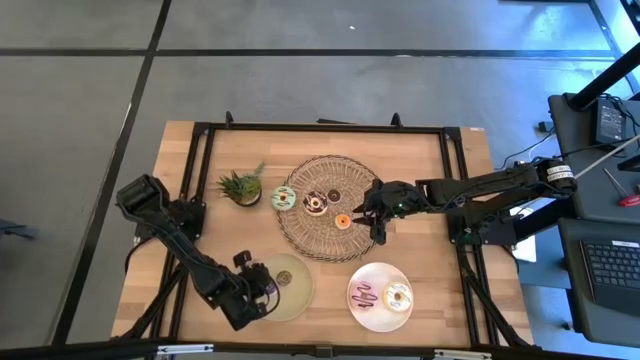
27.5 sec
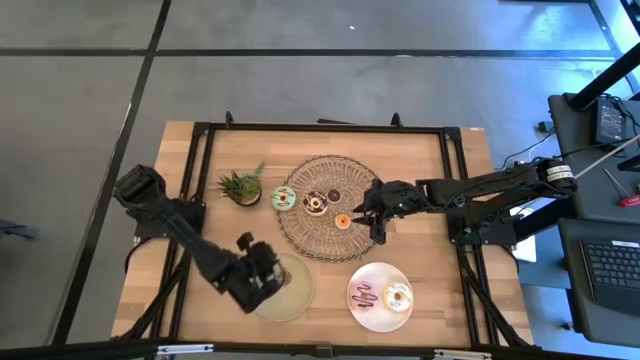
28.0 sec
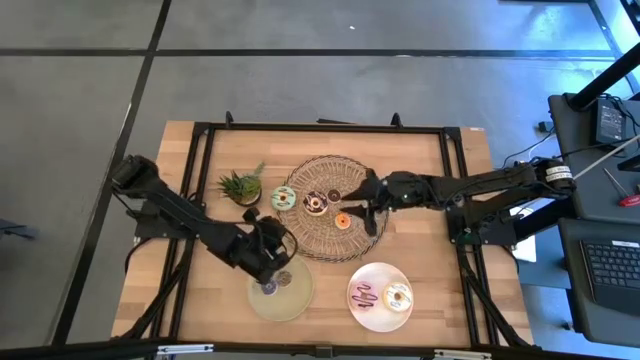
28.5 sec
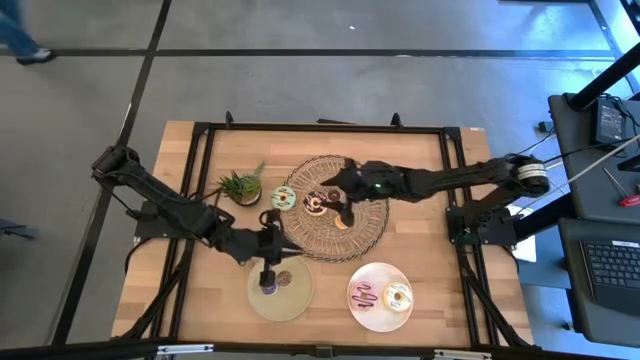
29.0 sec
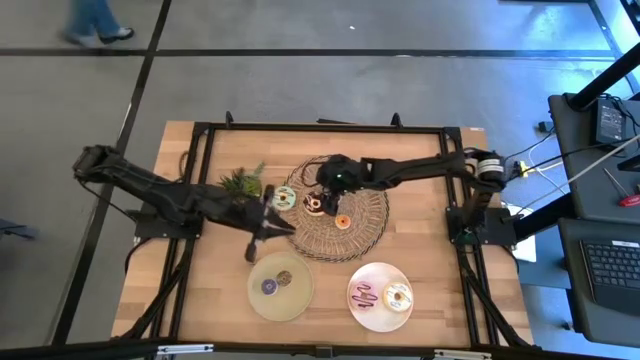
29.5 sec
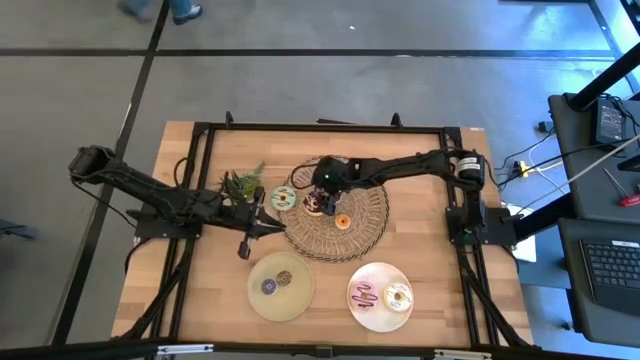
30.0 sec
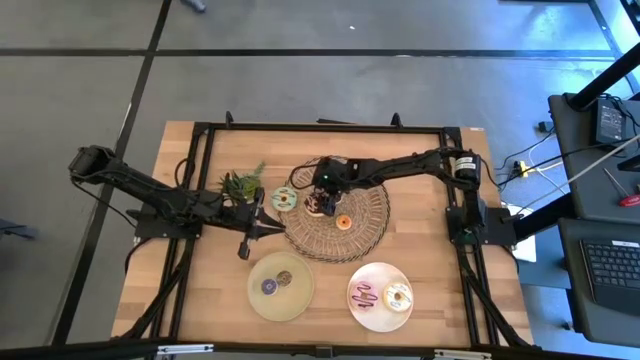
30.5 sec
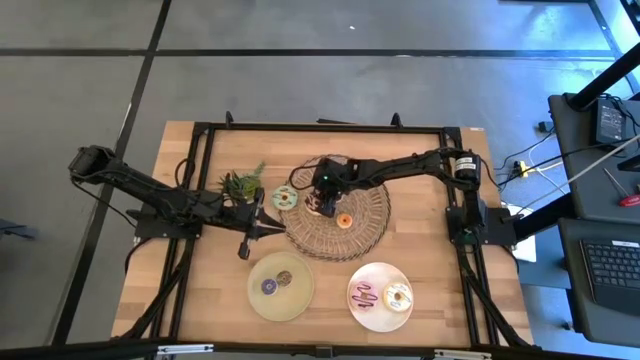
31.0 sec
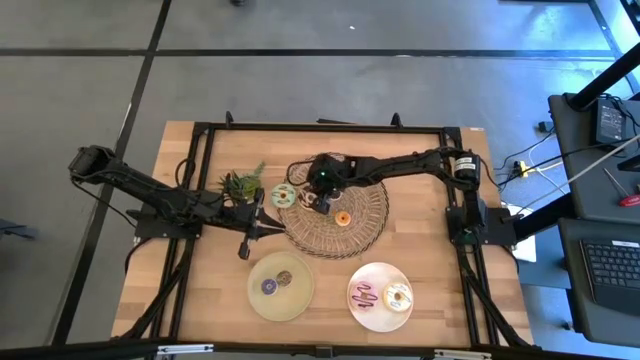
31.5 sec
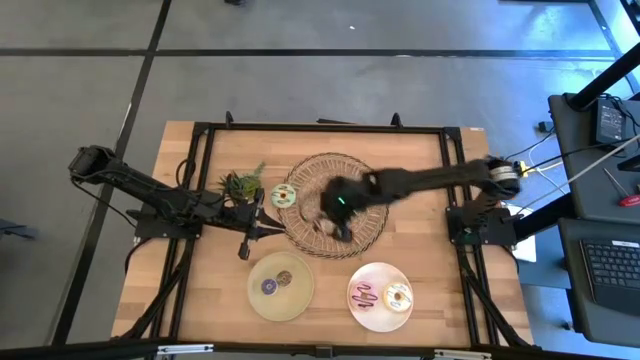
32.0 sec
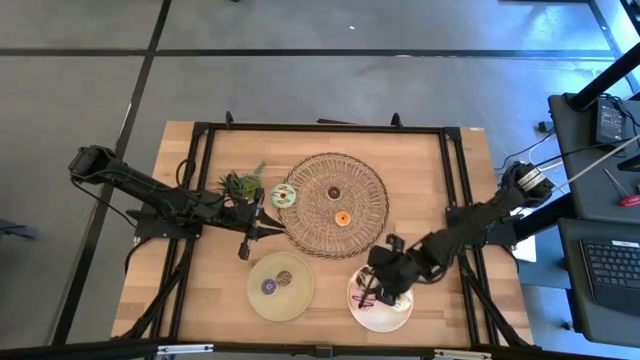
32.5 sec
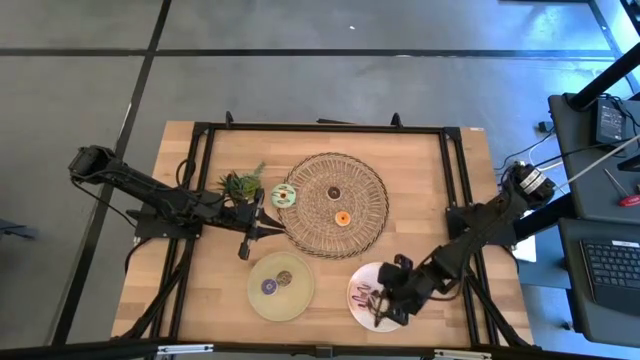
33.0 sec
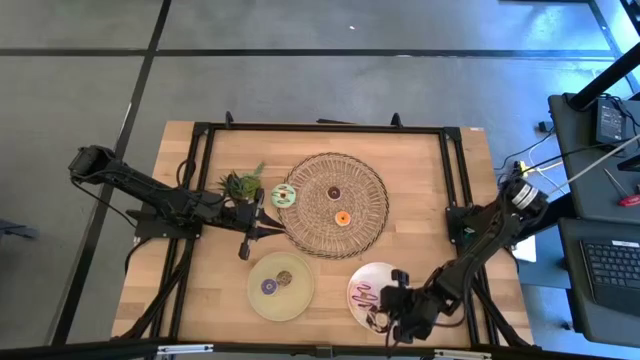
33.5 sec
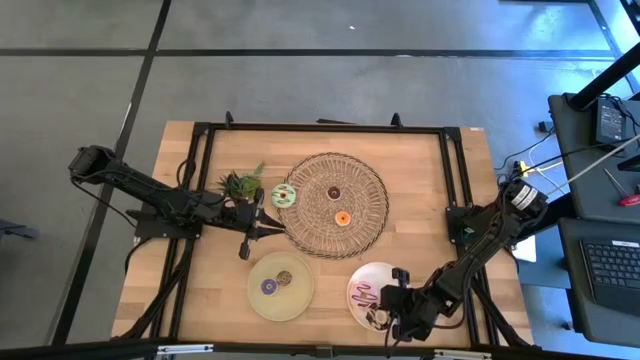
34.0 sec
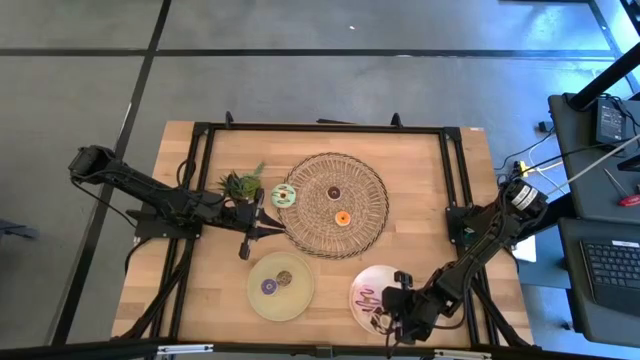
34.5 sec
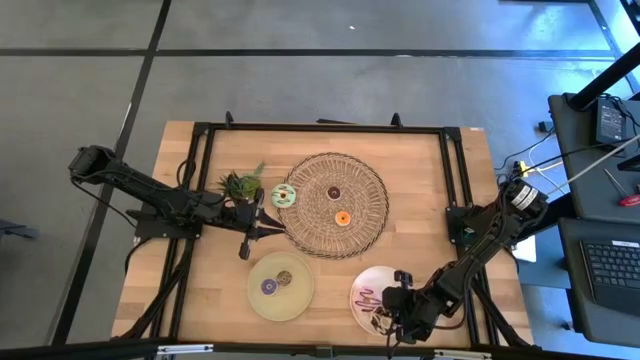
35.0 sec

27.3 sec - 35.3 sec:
Task: Pick & Place donuts
Put the big black donut on the white plate

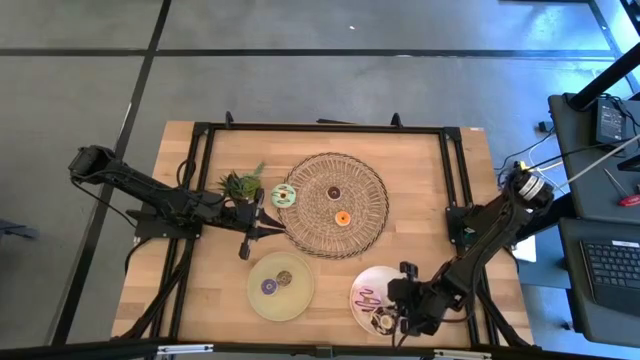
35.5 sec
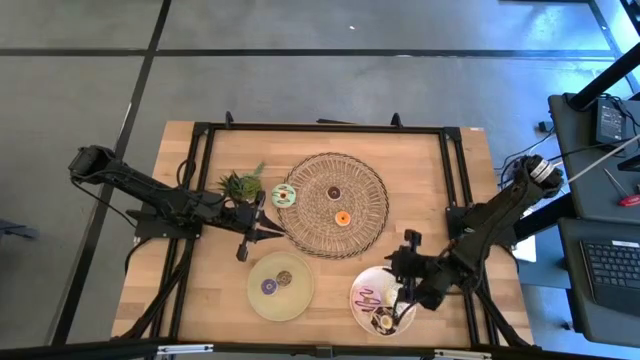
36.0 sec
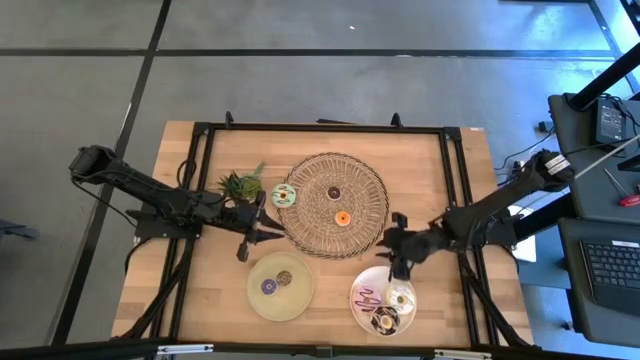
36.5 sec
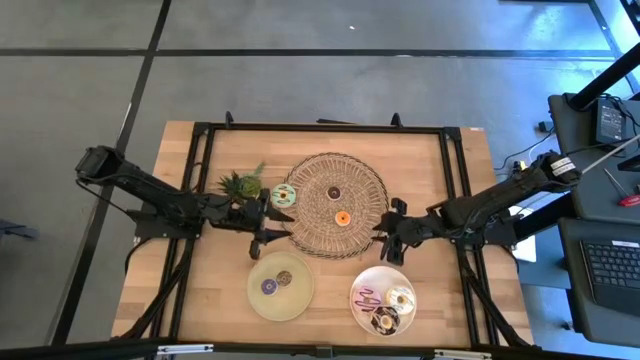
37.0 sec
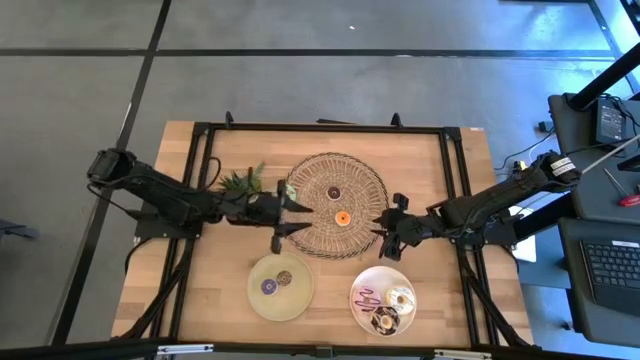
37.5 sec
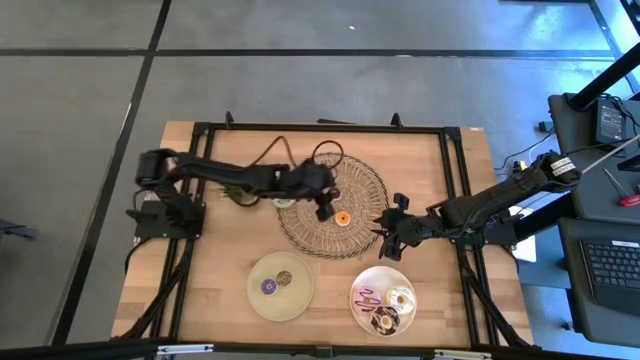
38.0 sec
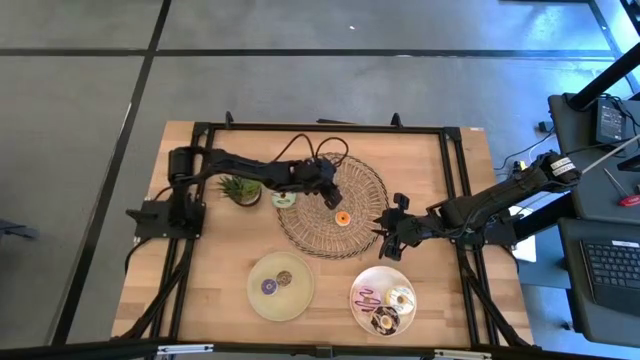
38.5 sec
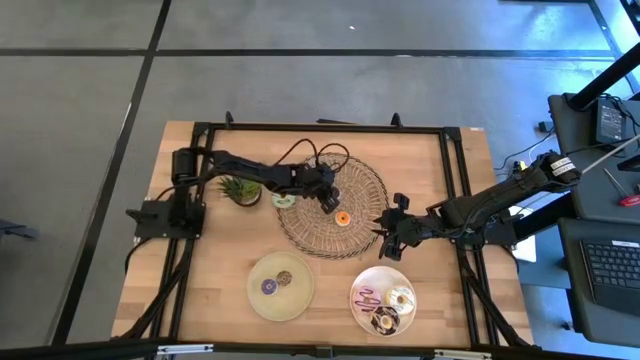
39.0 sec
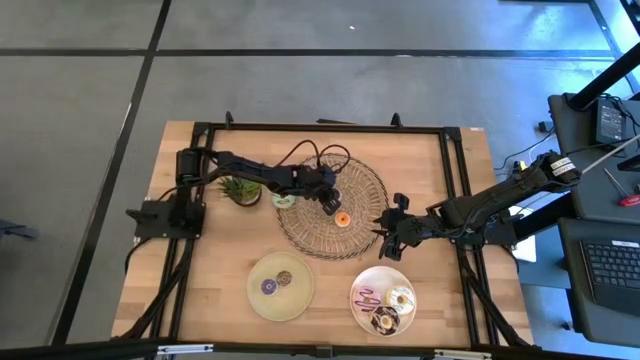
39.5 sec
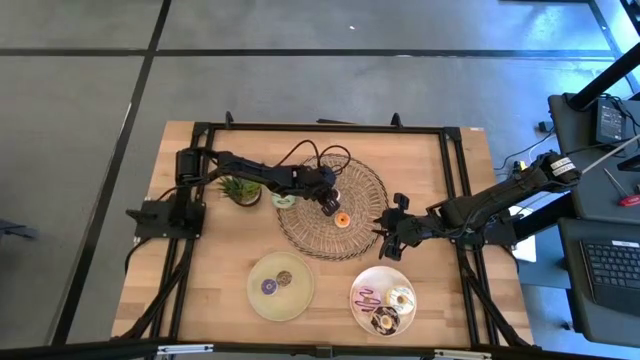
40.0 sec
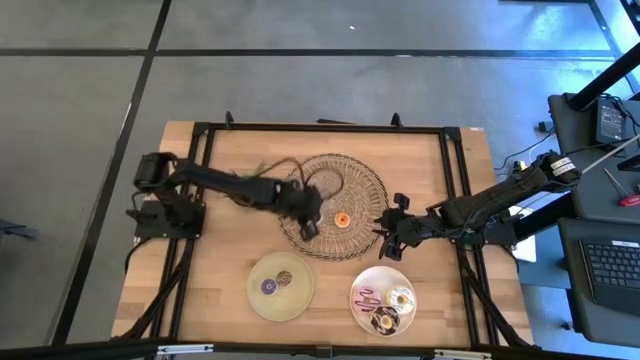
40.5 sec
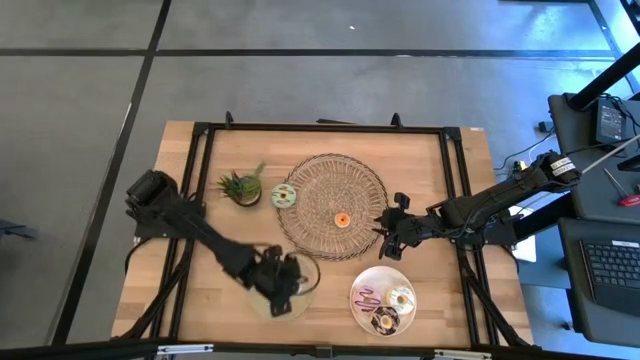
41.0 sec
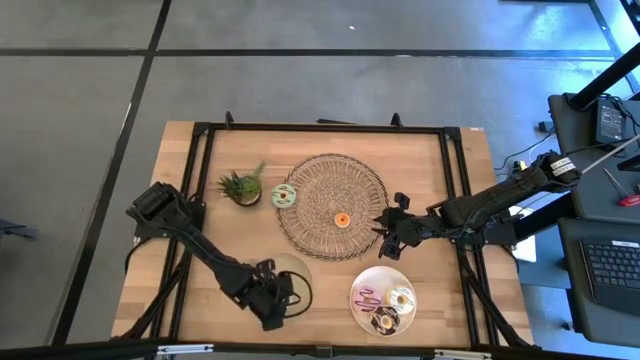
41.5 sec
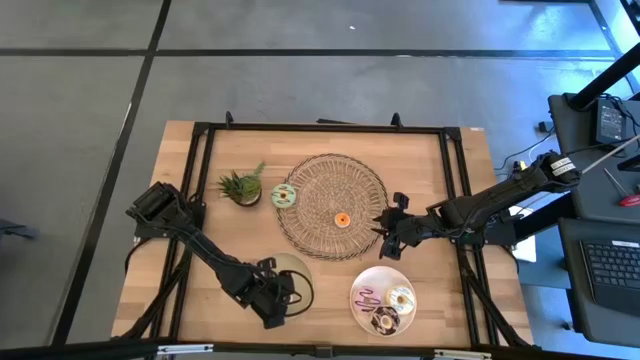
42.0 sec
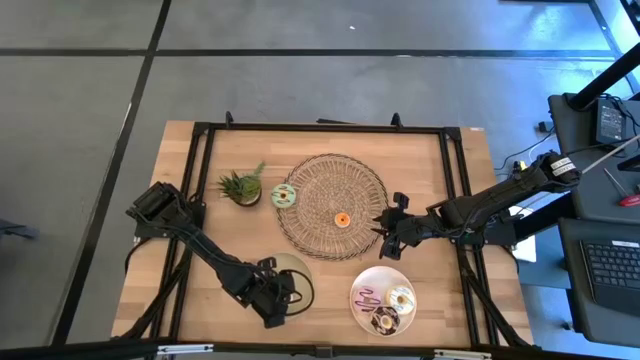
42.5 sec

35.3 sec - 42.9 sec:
Put the small black donut on the light gray plate

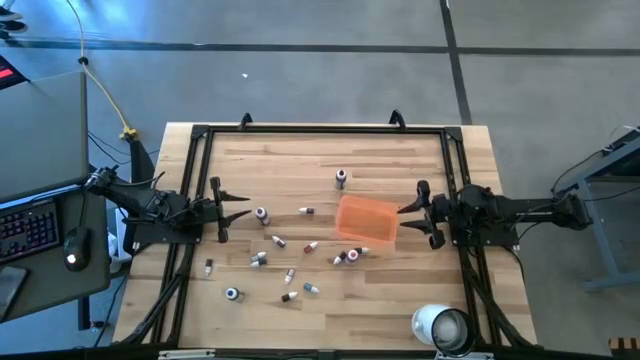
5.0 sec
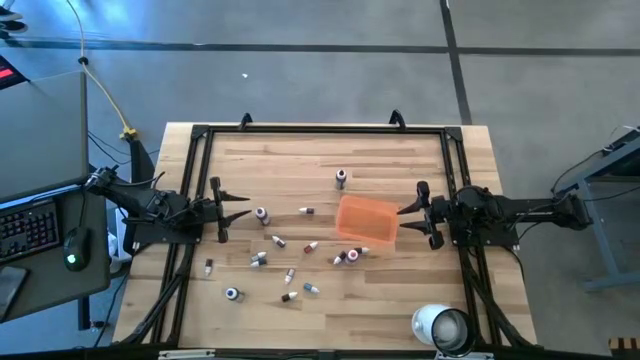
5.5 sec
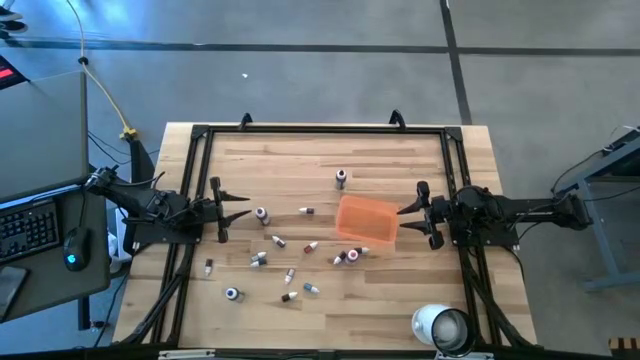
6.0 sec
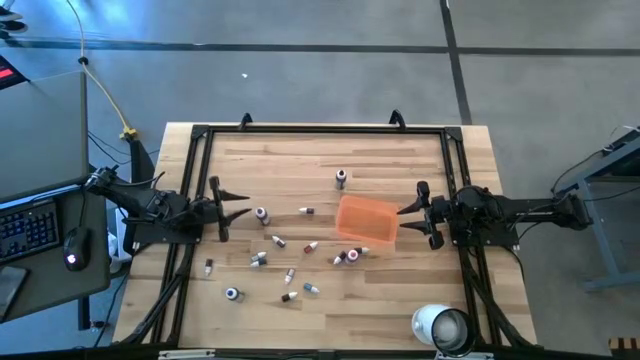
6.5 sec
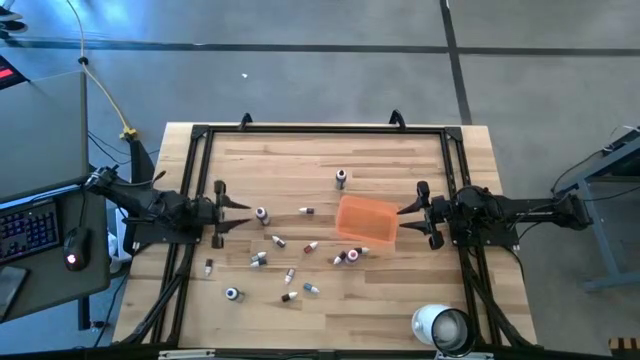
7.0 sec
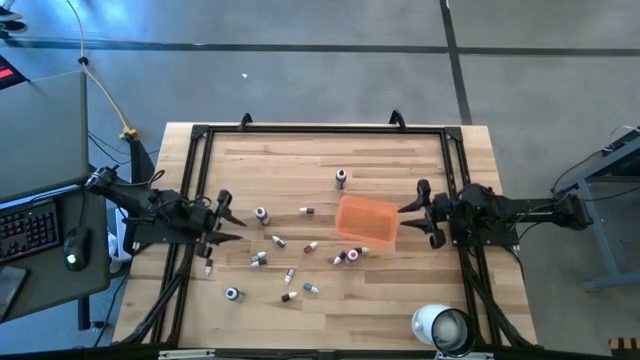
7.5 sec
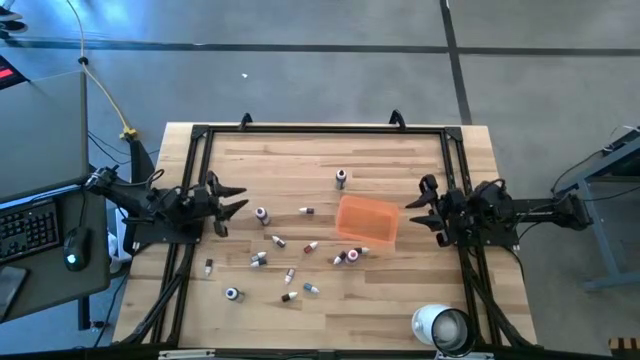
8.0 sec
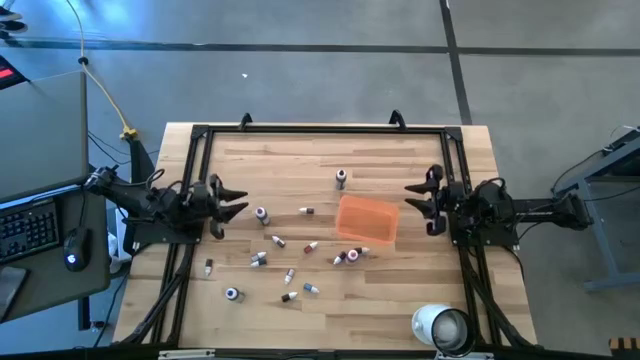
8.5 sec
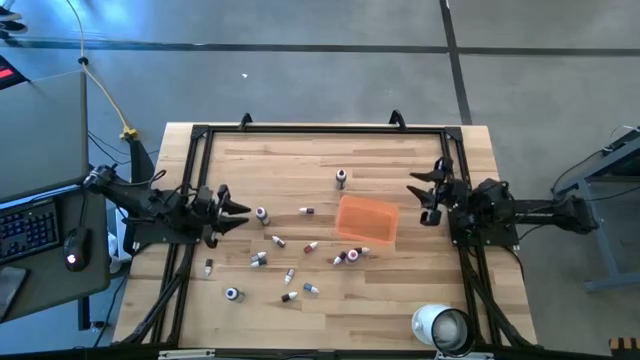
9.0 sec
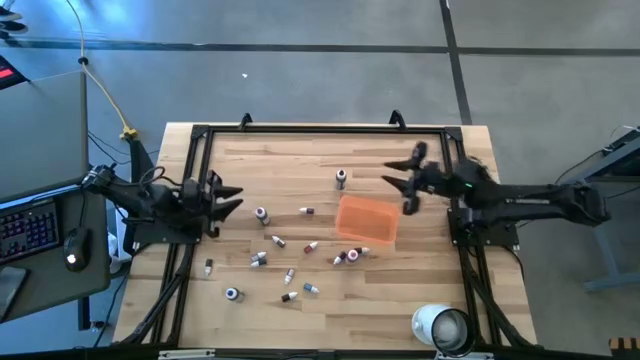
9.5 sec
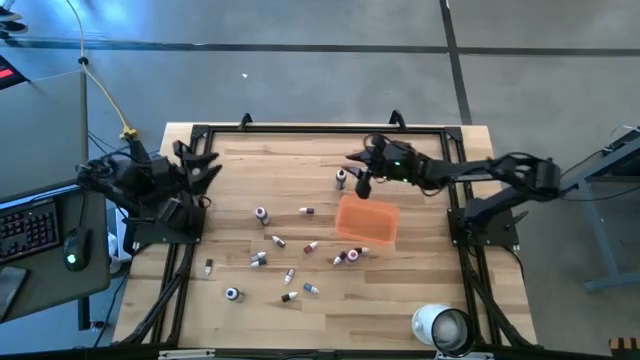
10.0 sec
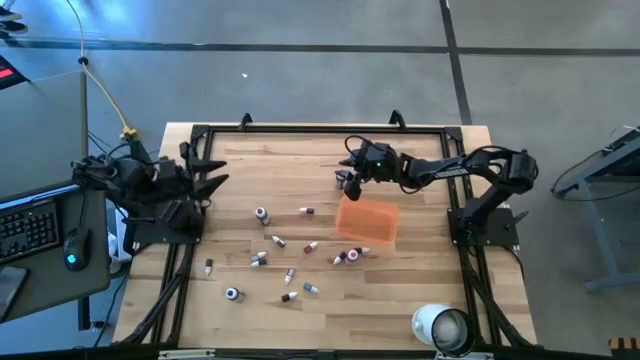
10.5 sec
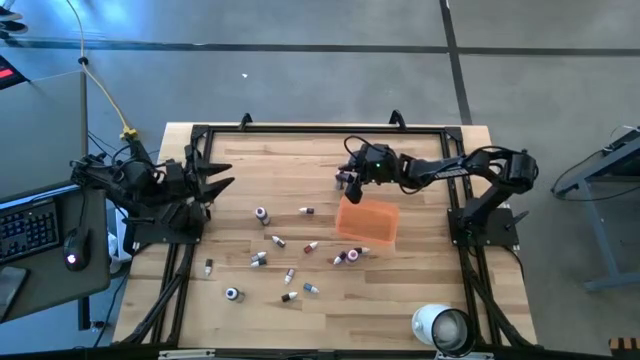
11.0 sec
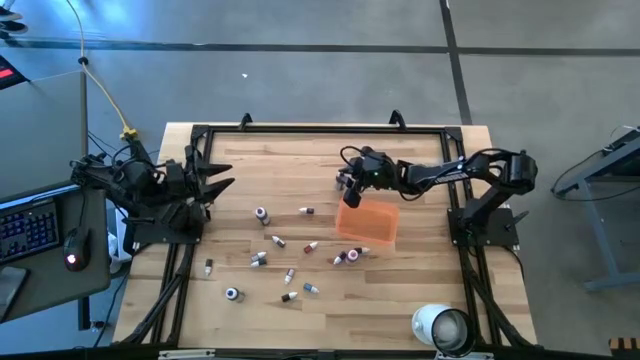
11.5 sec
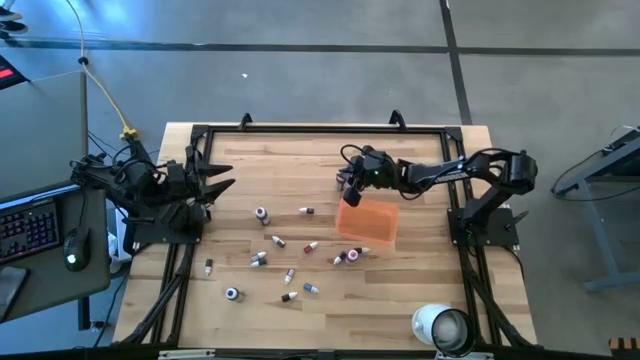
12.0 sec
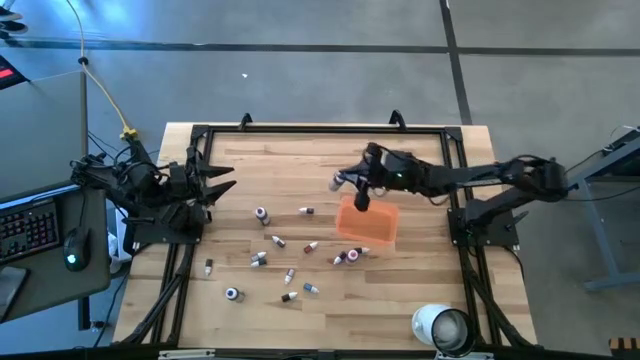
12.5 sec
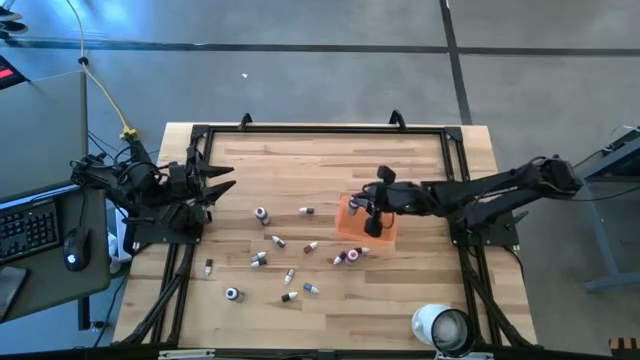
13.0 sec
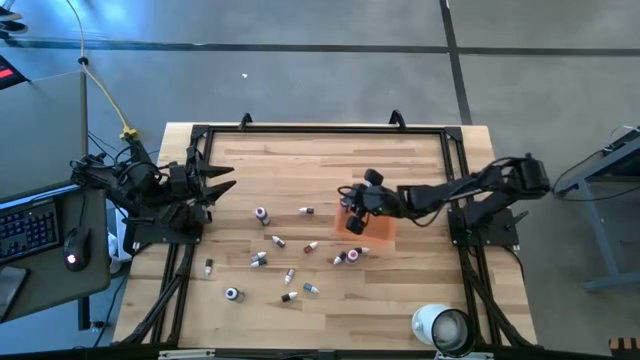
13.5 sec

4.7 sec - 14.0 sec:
Task: Pick & Place food coloring
Put the big black food coloring bottle into the orange bin
